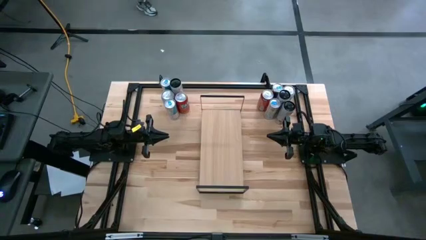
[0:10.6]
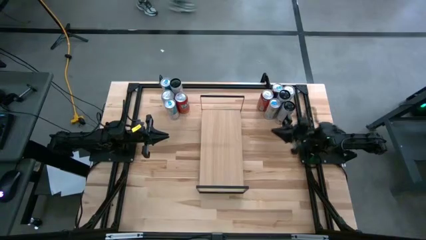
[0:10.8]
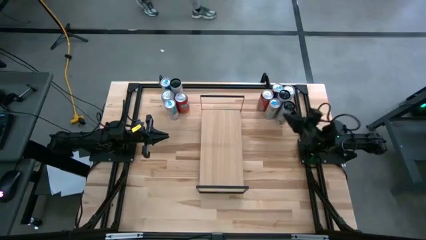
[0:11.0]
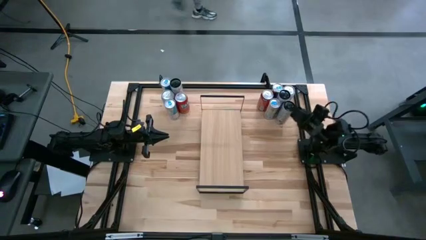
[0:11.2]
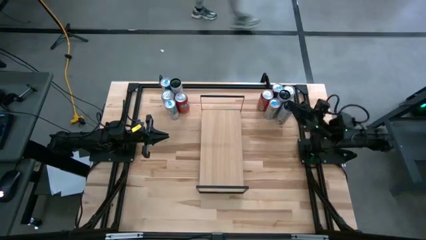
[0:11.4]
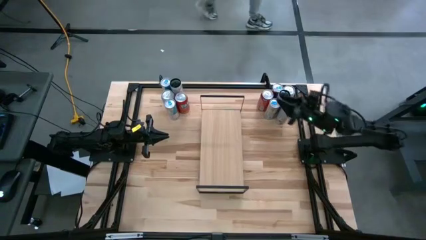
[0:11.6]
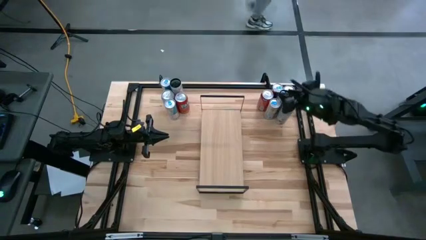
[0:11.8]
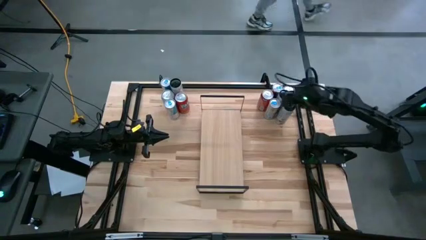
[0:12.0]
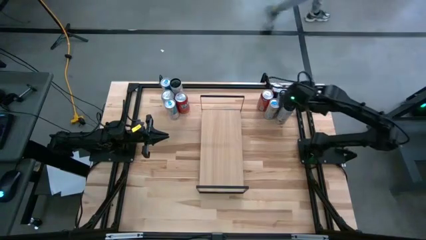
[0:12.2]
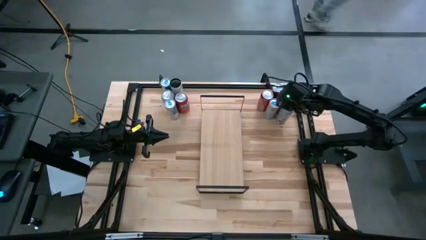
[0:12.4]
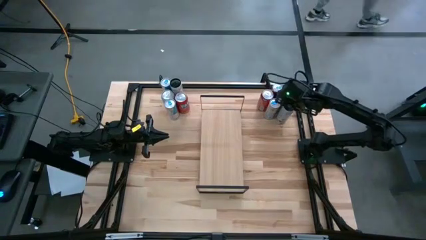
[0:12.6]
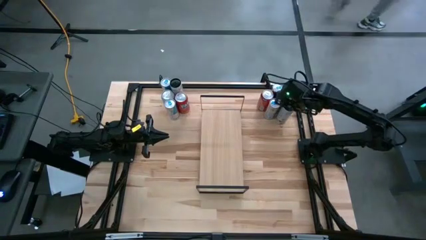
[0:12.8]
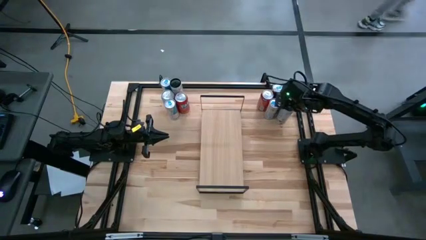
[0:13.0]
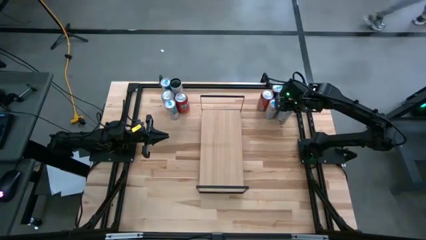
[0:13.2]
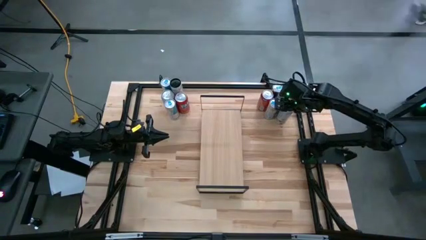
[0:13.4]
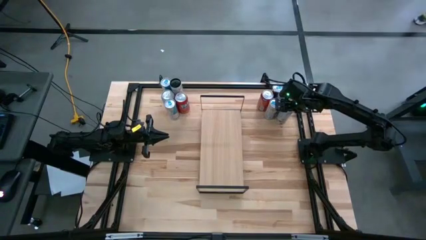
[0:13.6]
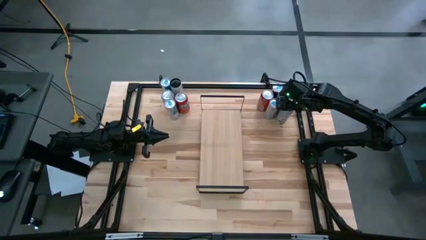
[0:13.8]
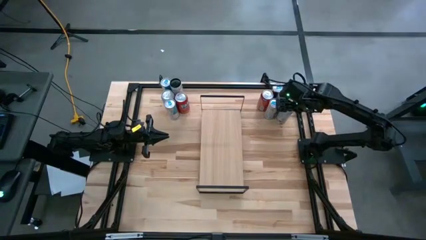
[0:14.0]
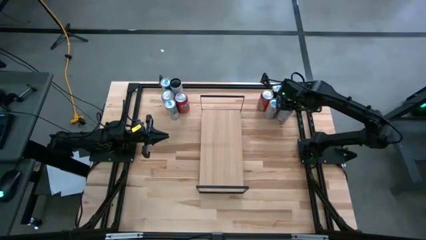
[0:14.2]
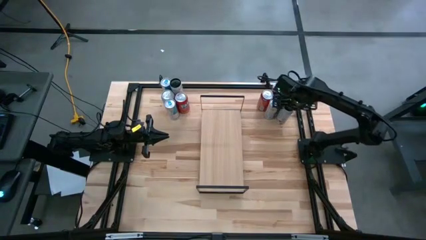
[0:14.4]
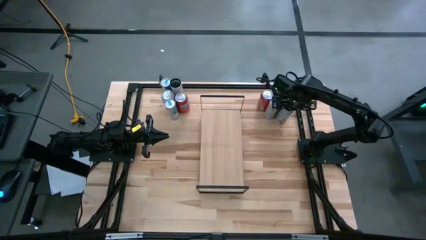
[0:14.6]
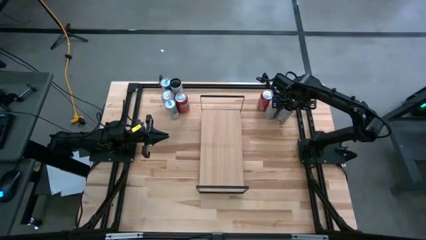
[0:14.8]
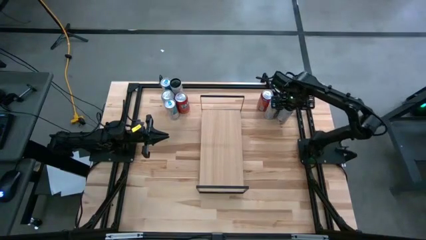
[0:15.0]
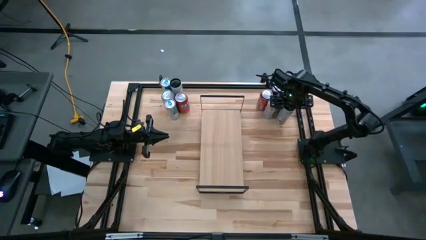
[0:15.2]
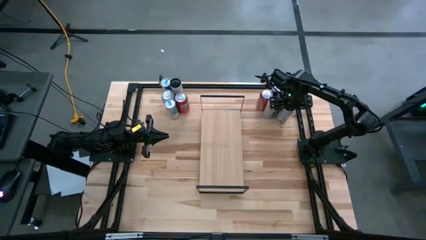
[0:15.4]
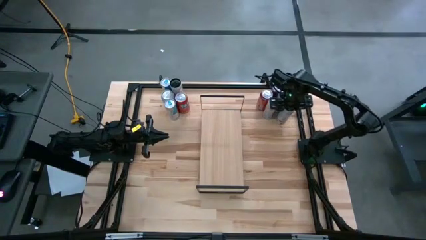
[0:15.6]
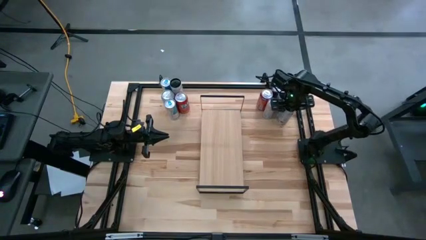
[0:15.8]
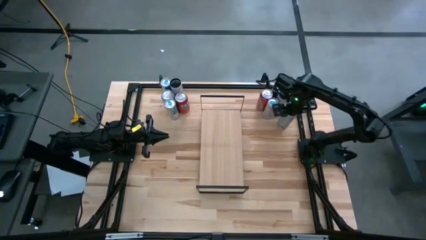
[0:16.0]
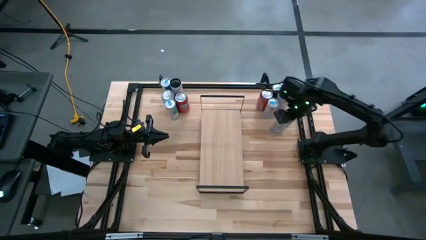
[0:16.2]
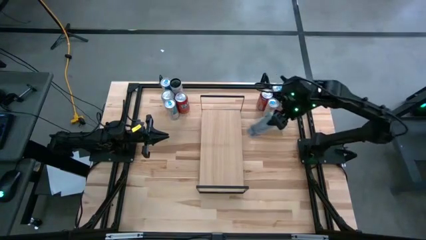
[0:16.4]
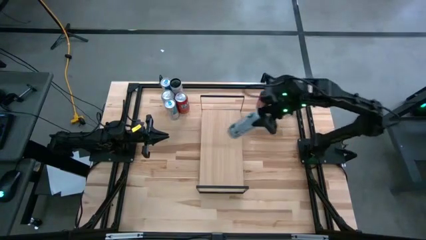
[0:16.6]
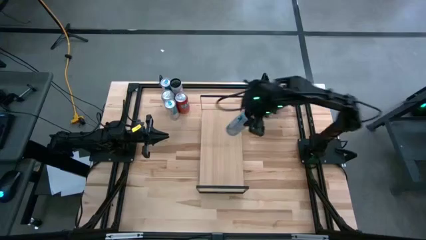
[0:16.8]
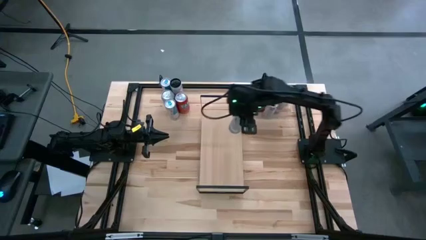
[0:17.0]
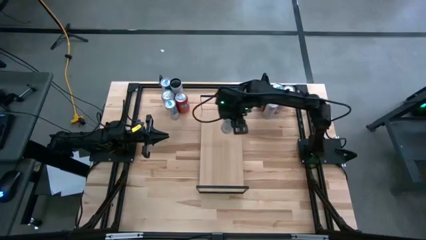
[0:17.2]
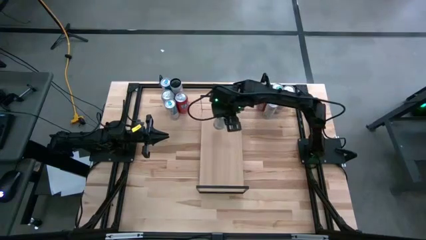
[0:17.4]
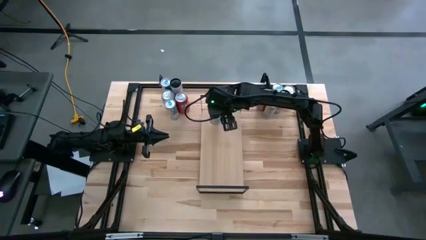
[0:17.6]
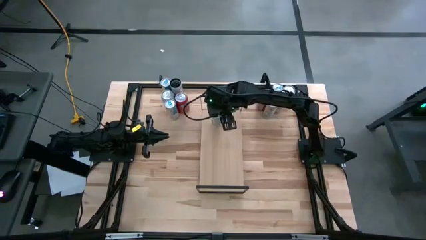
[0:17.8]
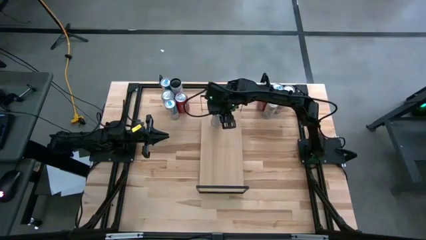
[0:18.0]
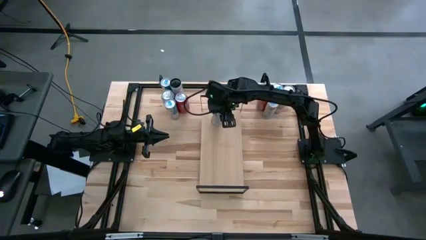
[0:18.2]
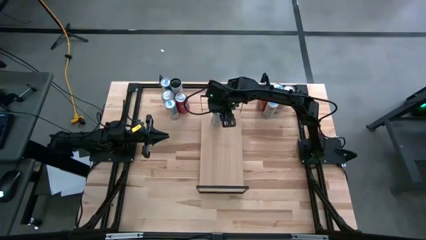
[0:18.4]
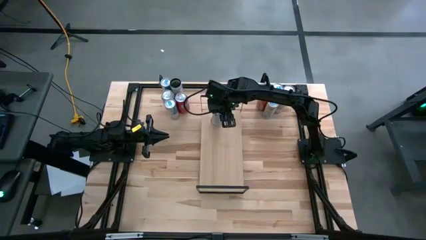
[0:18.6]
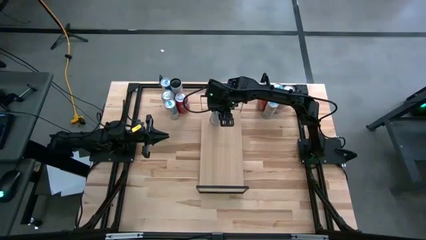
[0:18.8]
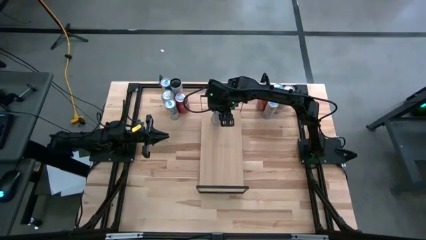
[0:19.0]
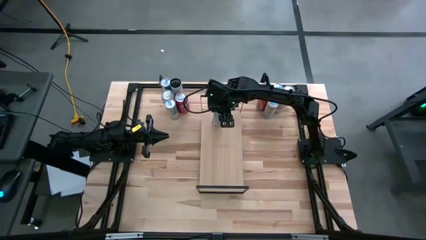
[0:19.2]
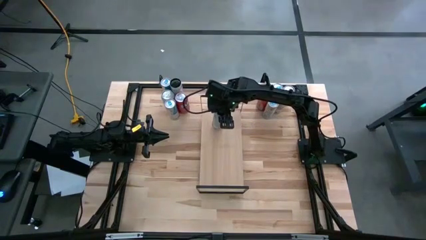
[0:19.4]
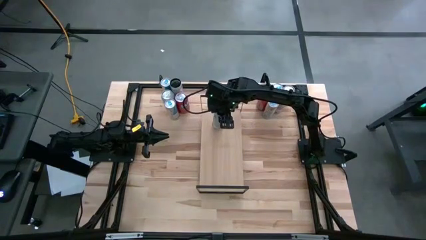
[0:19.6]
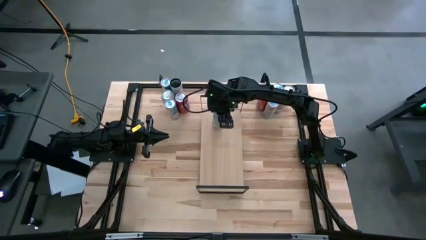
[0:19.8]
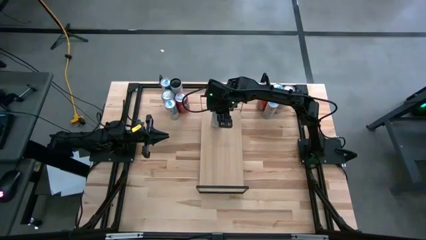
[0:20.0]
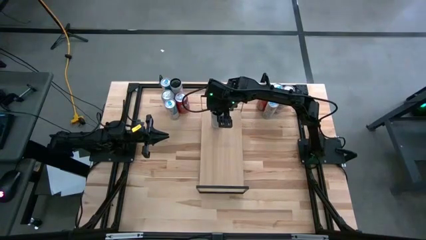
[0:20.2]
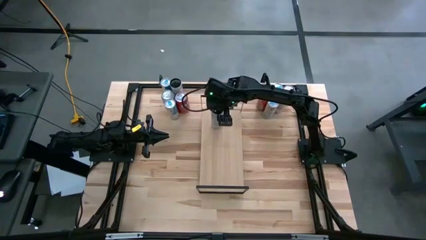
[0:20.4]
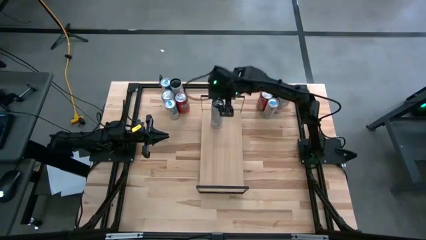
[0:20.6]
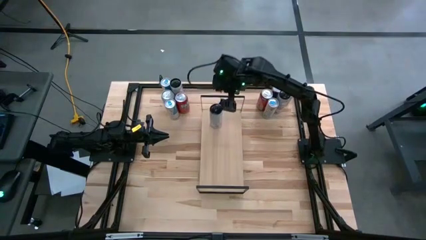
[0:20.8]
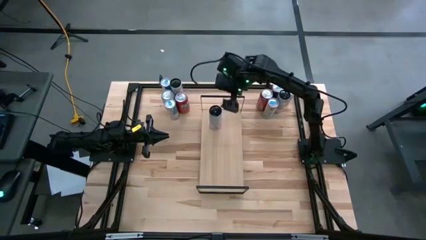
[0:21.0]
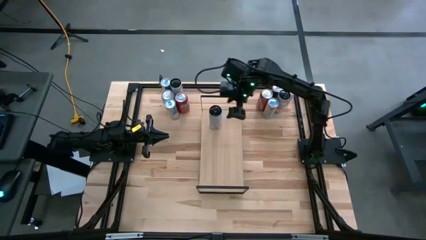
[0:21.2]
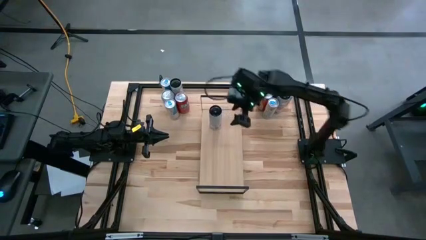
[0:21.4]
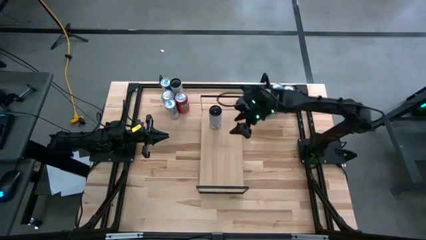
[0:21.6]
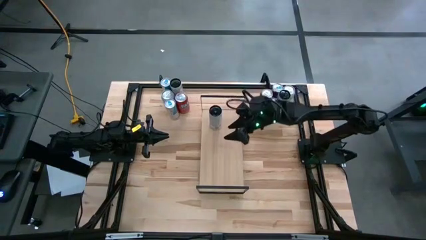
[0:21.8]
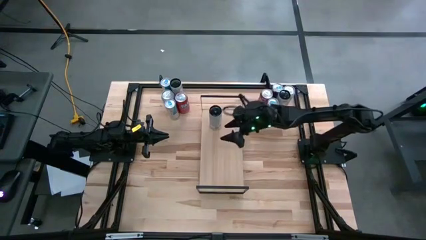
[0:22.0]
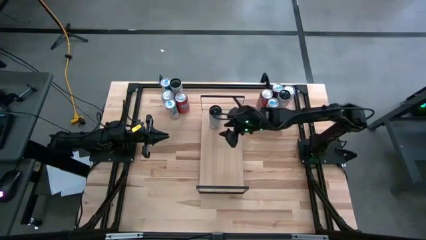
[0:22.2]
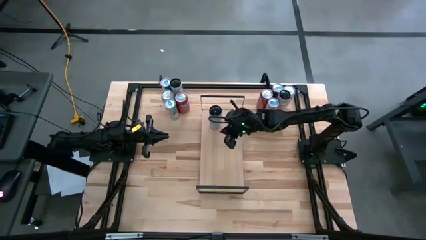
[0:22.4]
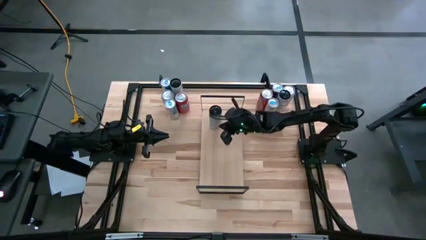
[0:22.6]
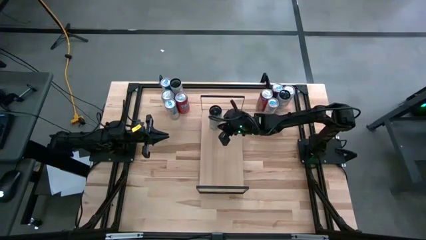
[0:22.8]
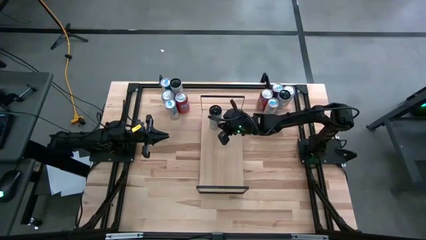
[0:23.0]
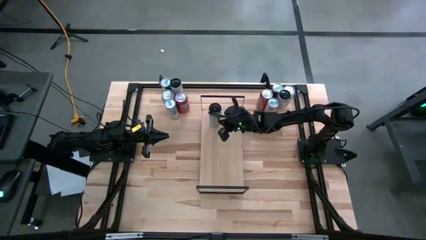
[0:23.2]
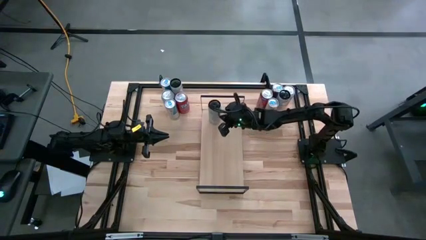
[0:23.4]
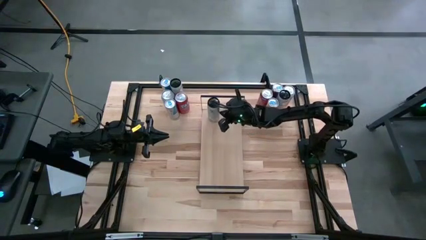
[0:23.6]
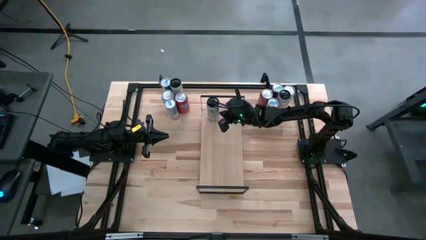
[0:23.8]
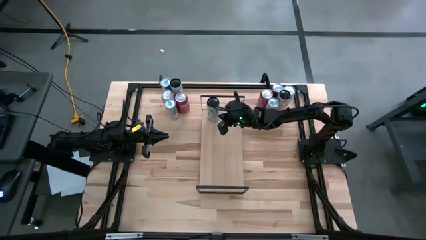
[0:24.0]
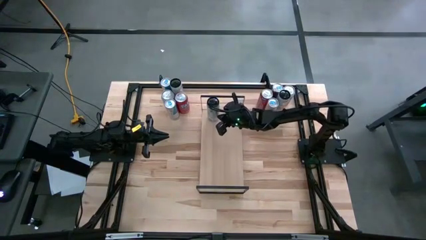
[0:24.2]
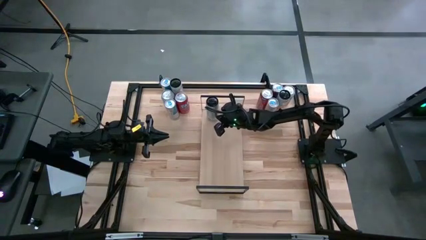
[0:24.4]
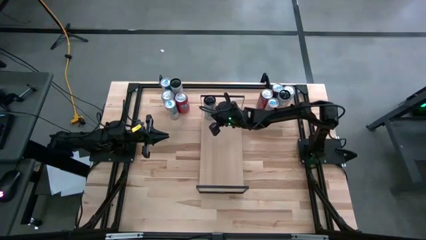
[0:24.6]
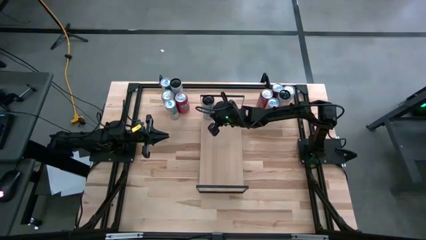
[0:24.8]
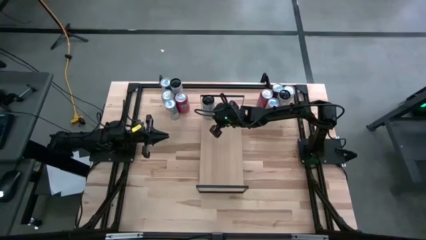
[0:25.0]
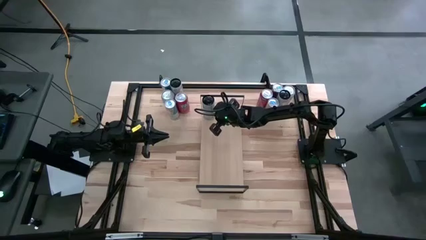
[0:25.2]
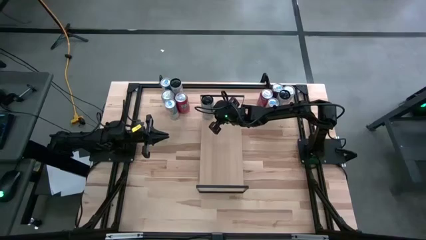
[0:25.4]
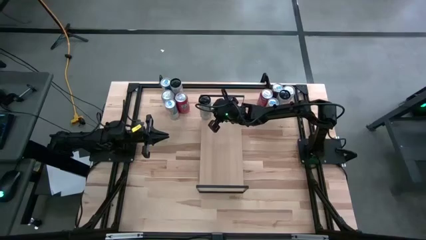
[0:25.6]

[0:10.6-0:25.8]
Task: Place canned beverage on shelf
Put the bottom right white-pink soda can on the shelf
